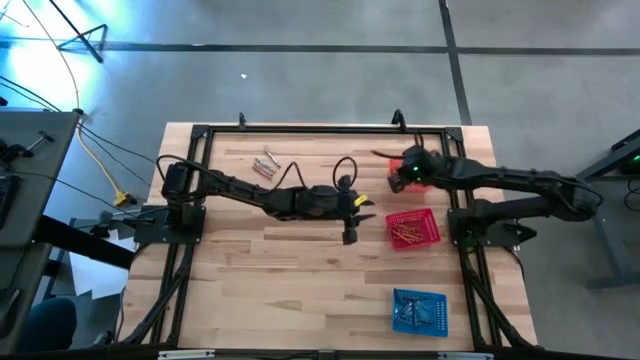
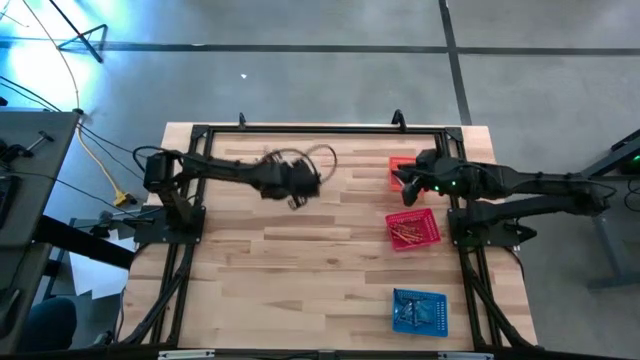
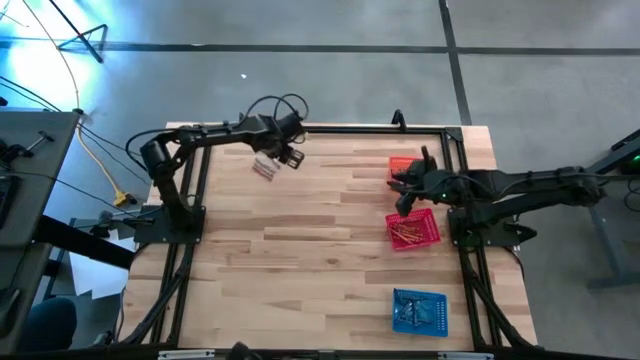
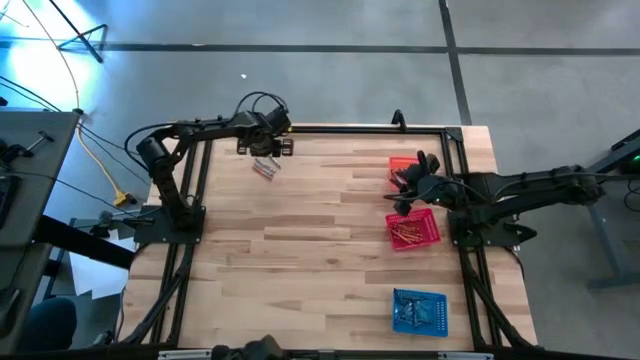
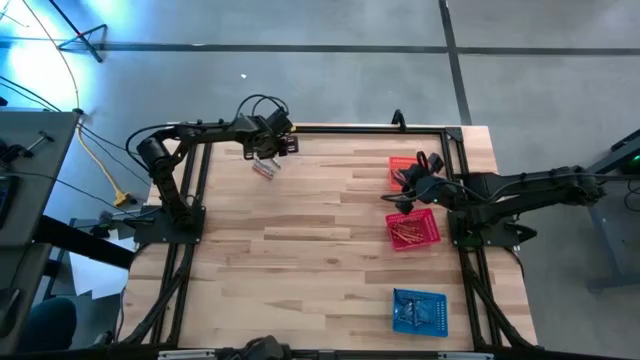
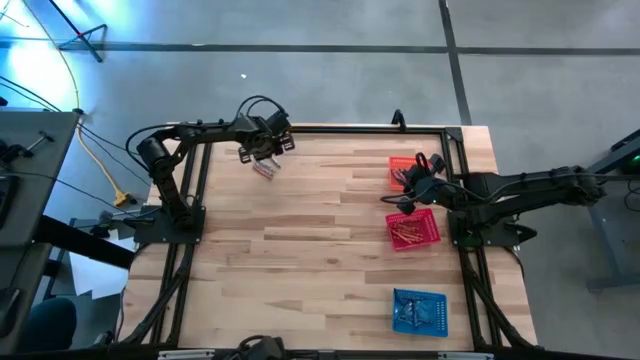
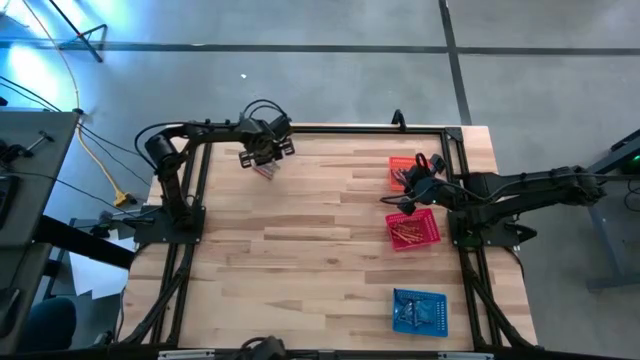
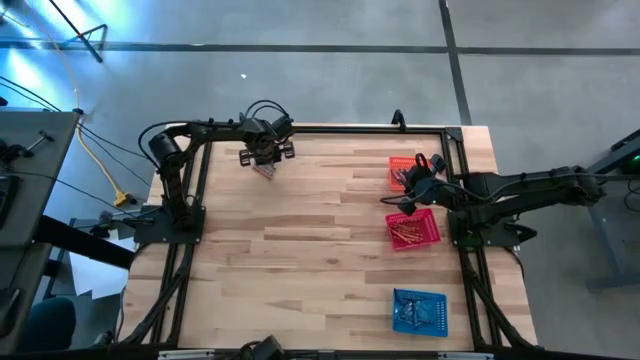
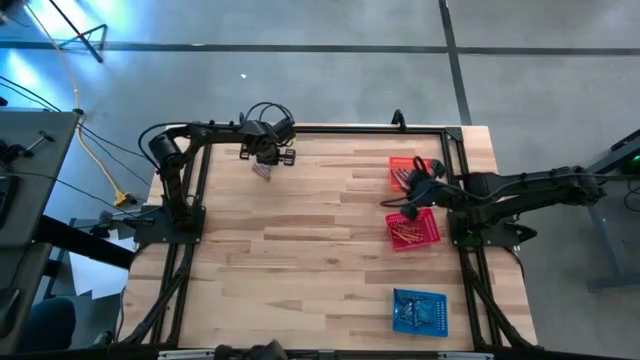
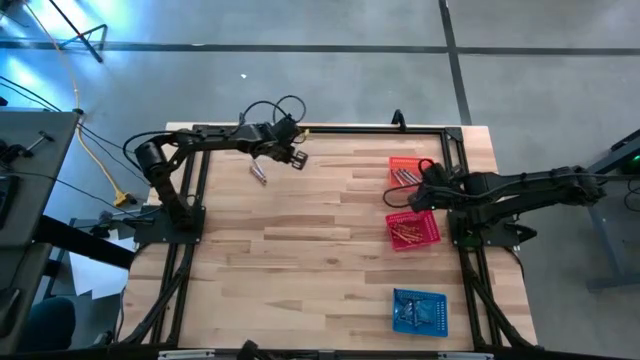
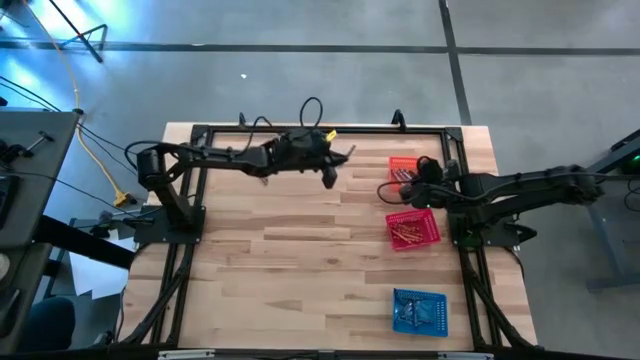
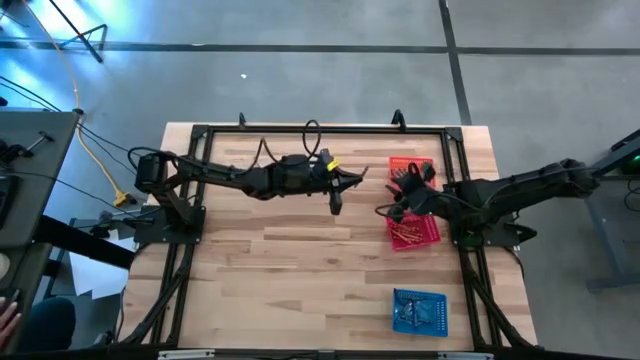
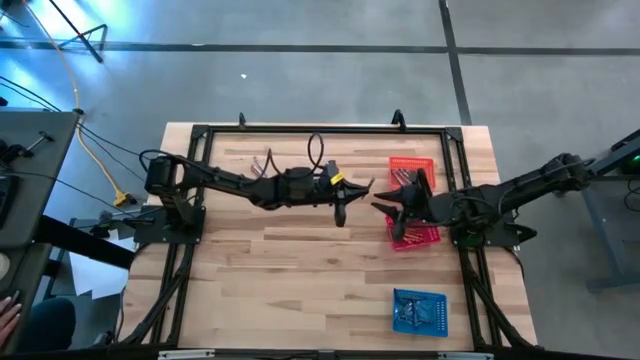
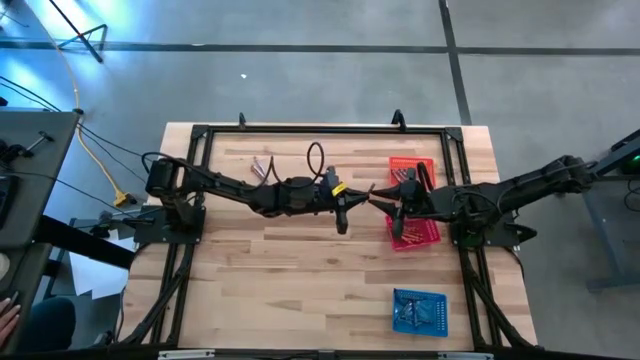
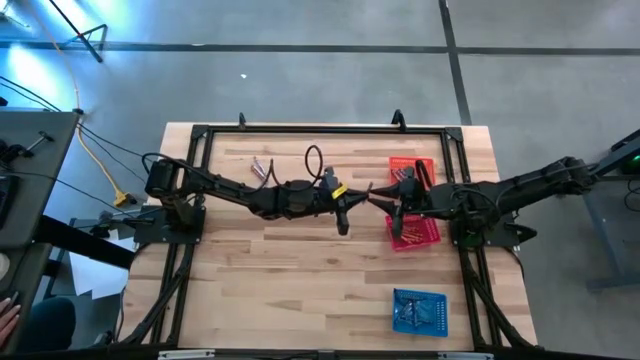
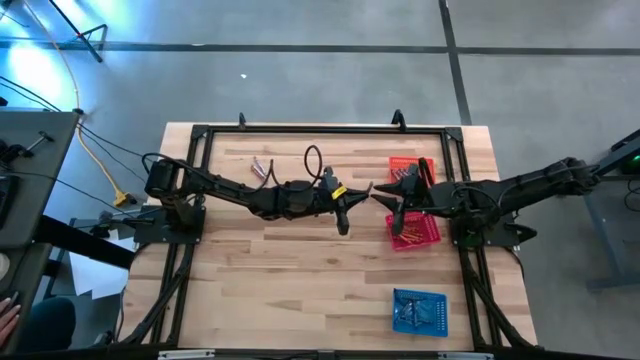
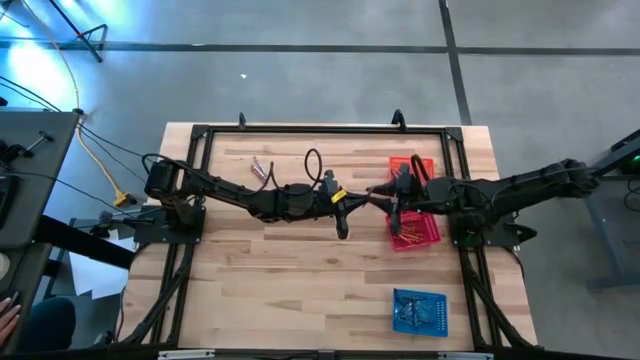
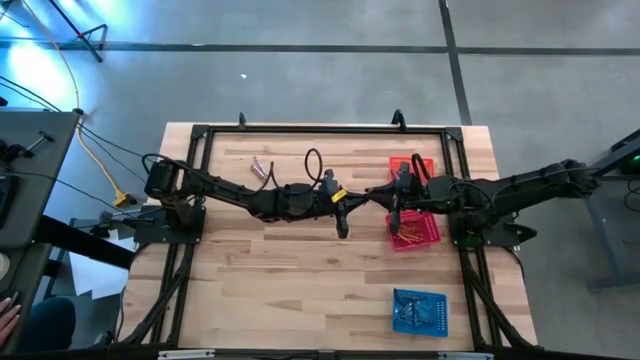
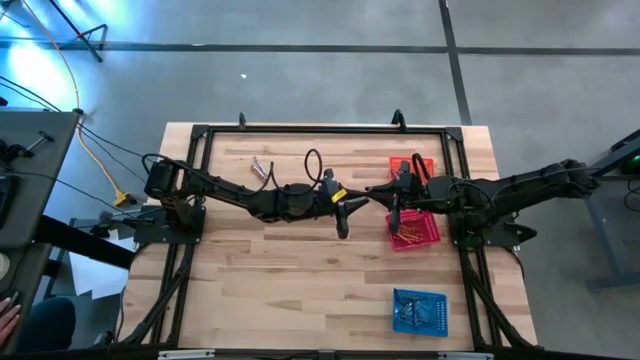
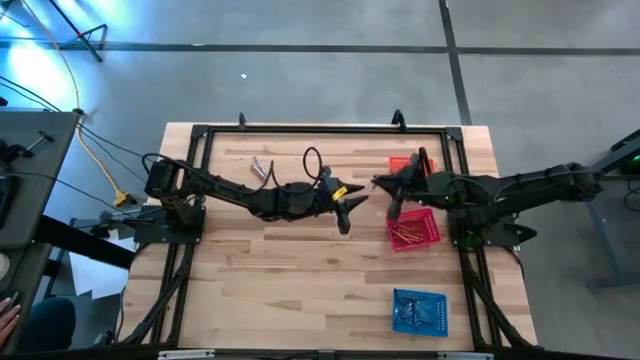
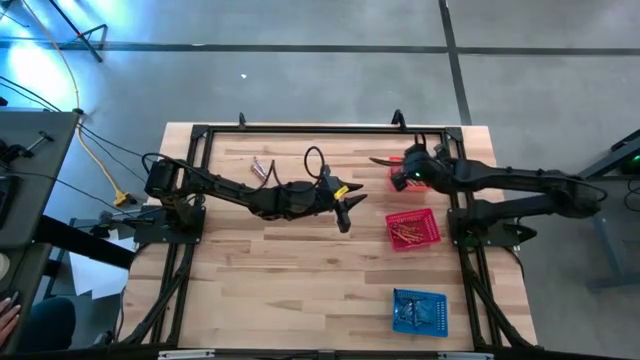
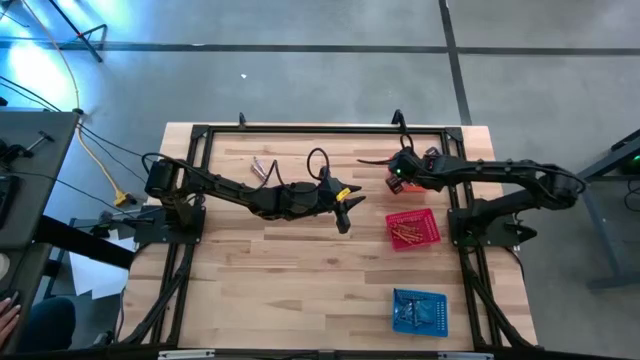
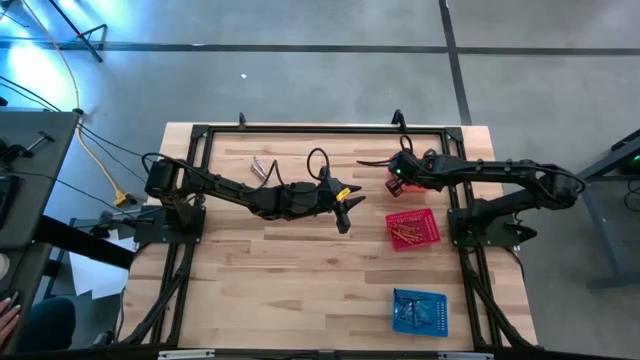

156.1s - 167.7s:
Task: Sort crayons
Put the gray crayon into the orange bin

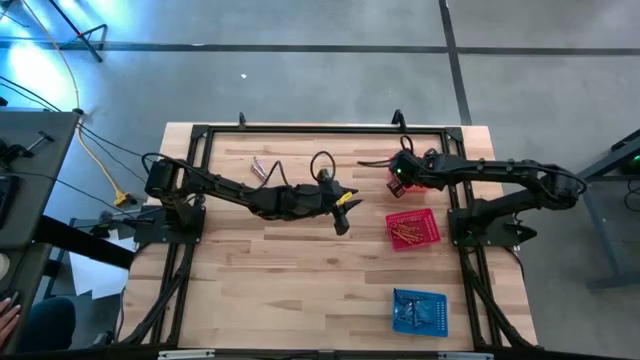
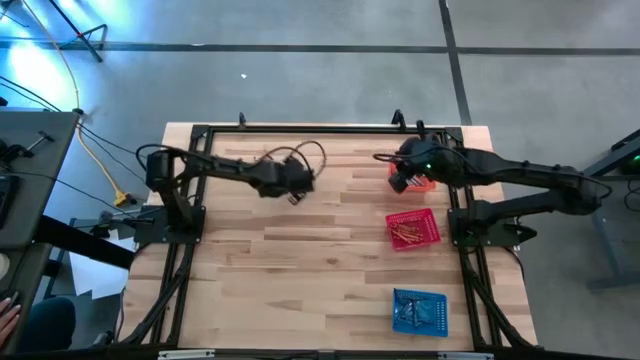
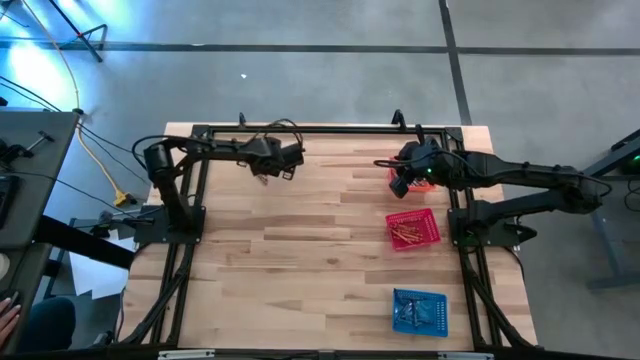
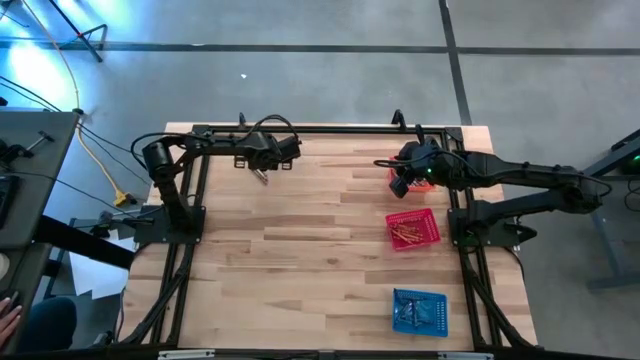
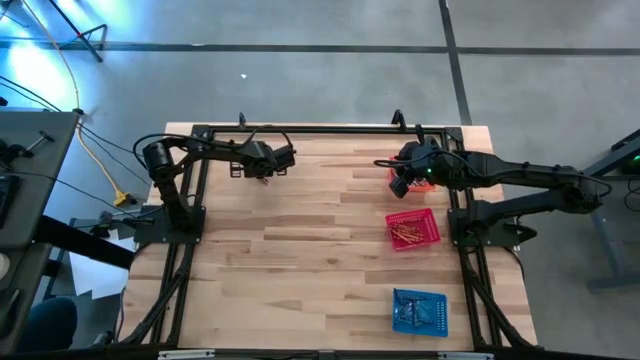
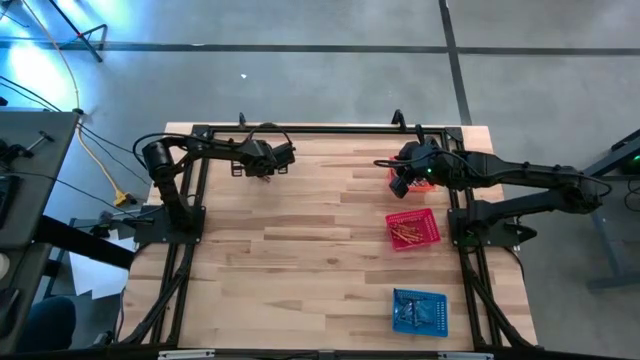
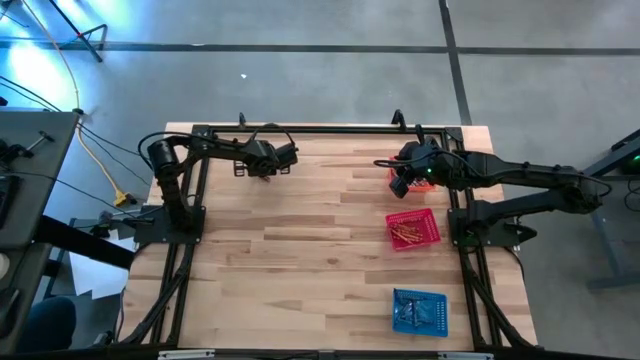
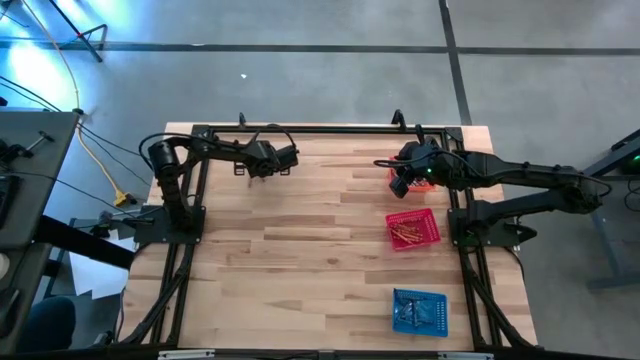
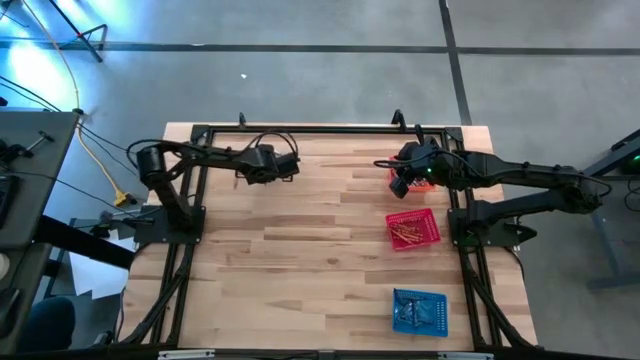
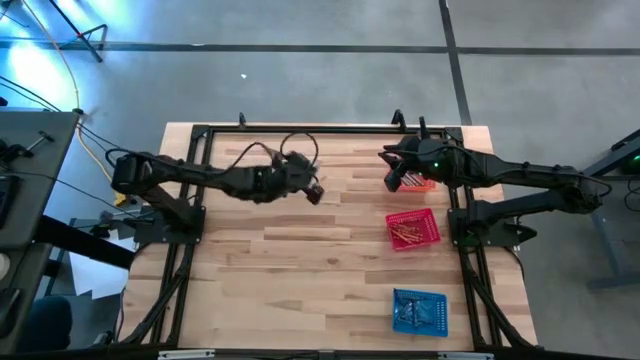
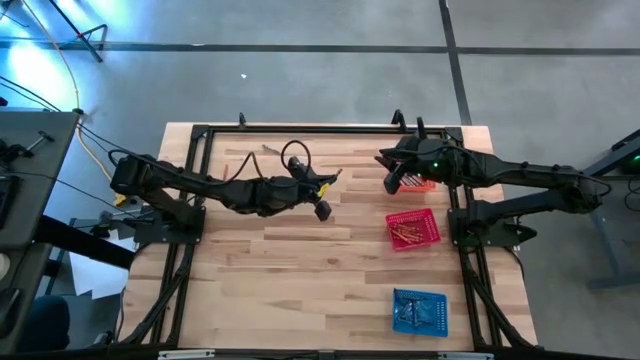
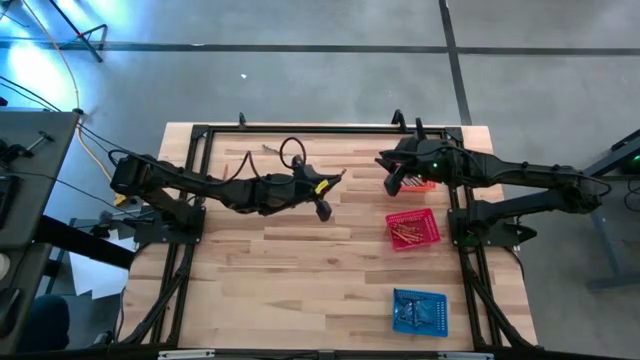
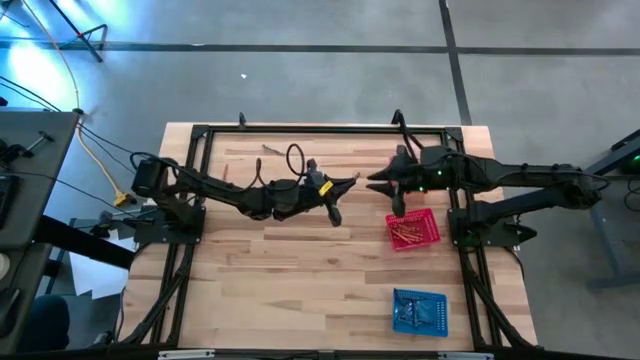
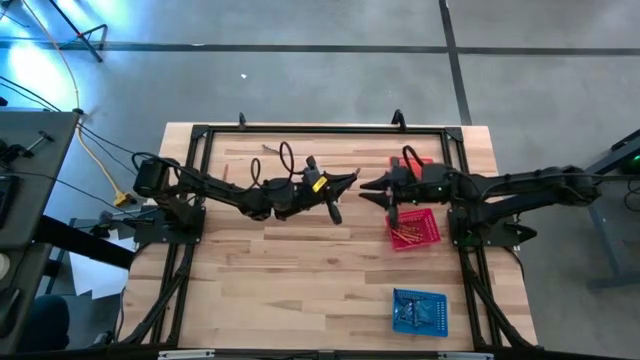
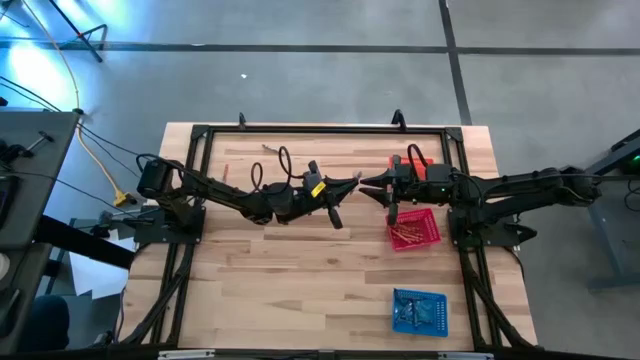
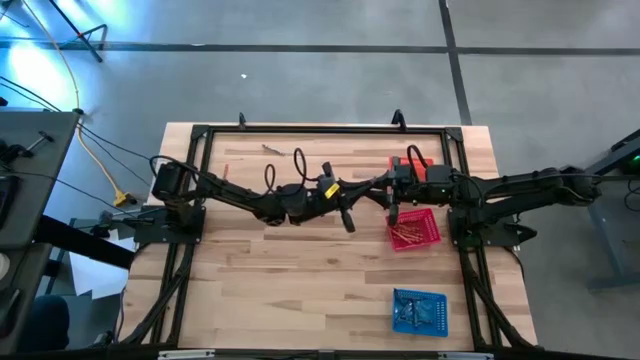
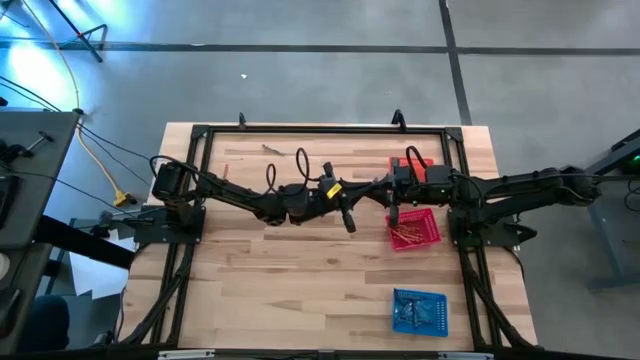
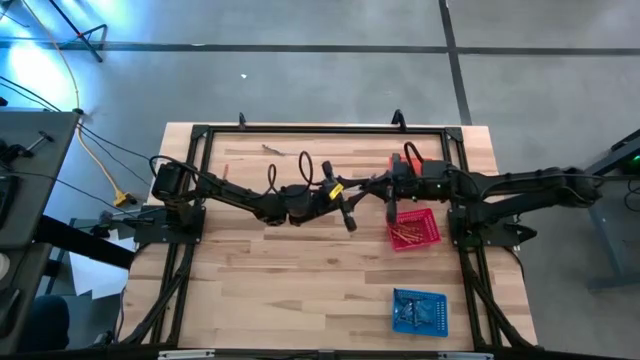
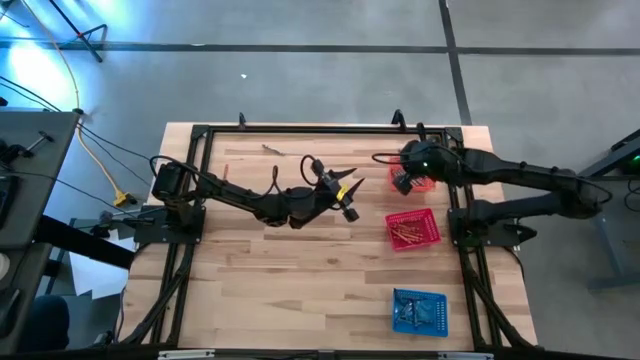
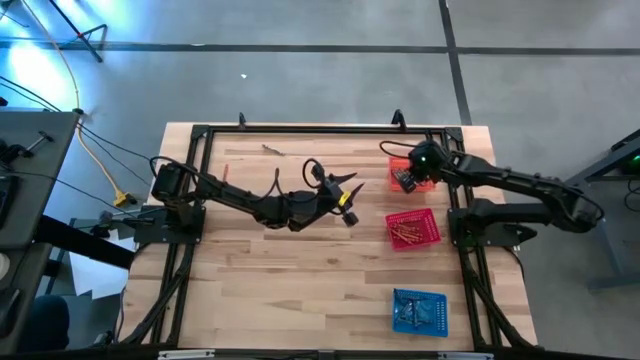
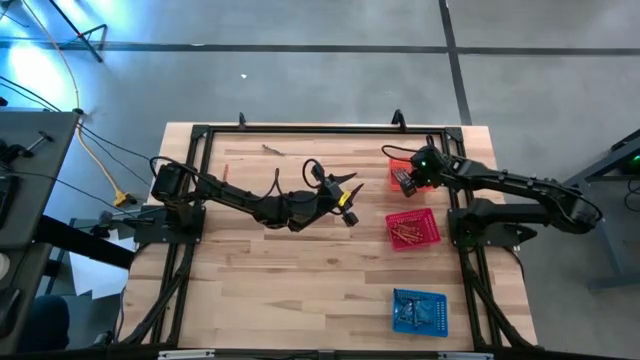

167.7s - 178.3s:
Put the gray crayon into the orange bin
